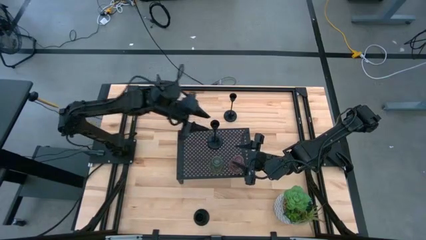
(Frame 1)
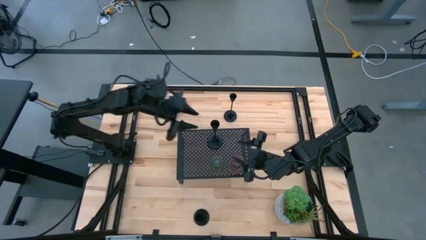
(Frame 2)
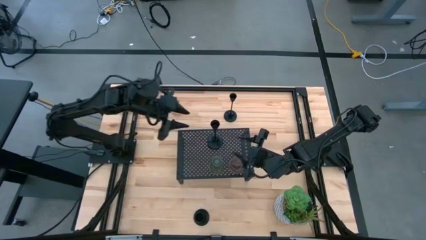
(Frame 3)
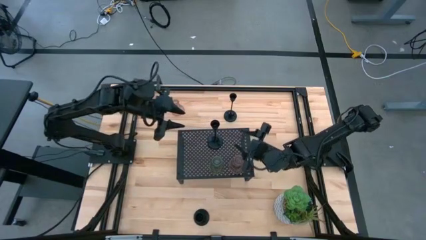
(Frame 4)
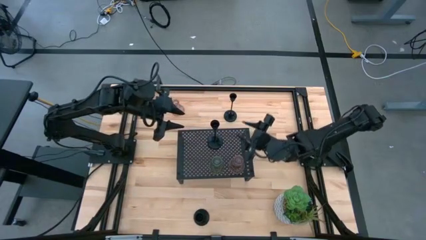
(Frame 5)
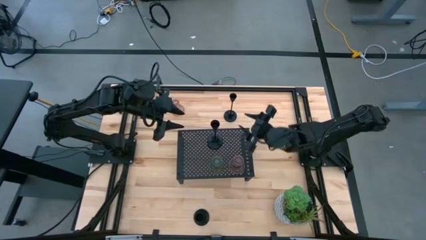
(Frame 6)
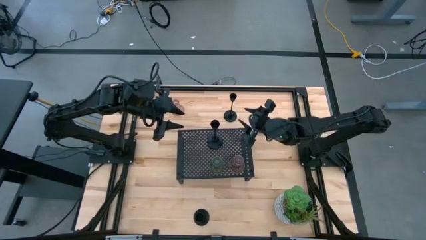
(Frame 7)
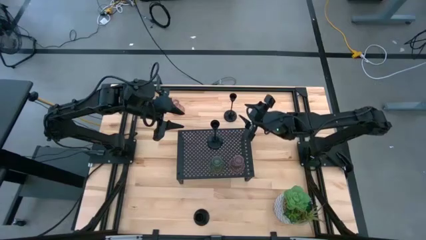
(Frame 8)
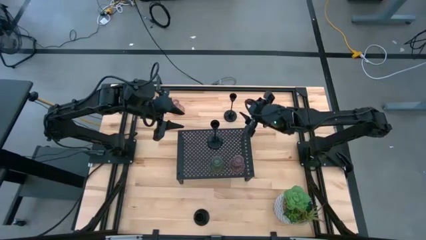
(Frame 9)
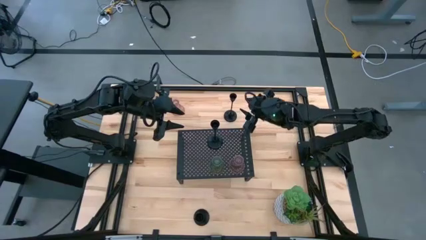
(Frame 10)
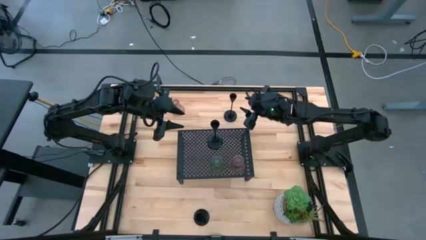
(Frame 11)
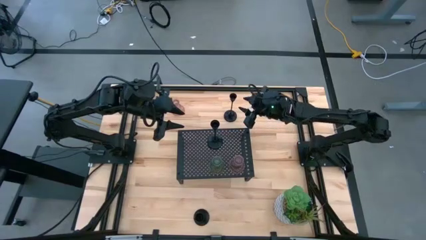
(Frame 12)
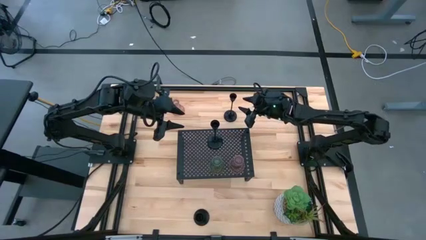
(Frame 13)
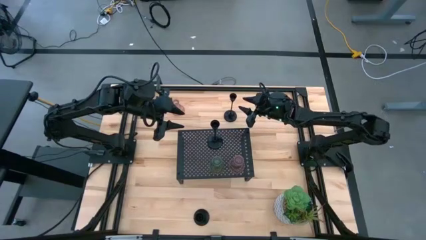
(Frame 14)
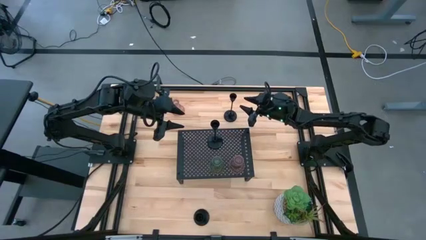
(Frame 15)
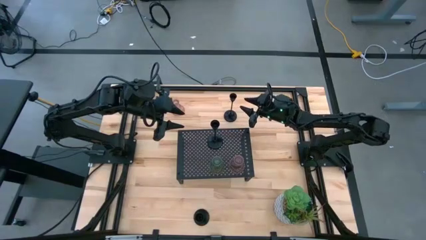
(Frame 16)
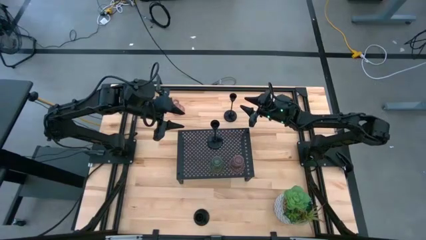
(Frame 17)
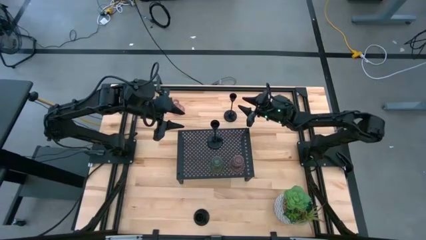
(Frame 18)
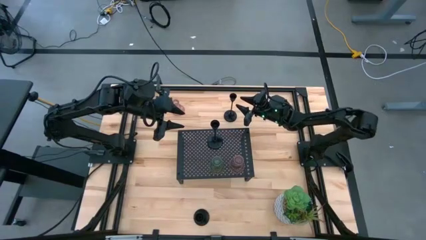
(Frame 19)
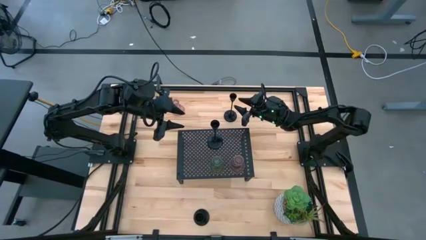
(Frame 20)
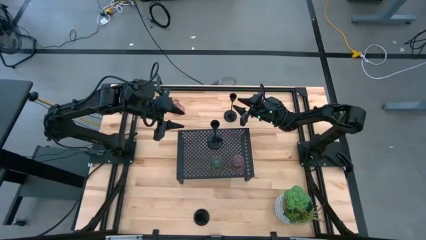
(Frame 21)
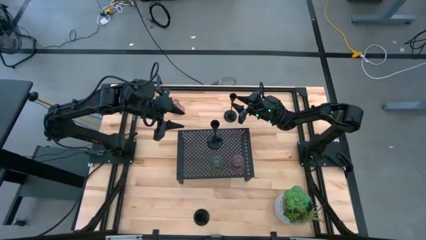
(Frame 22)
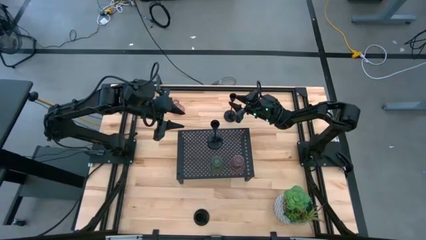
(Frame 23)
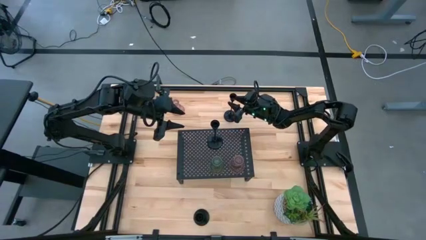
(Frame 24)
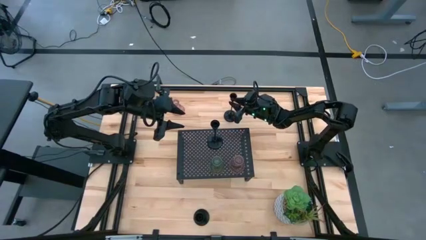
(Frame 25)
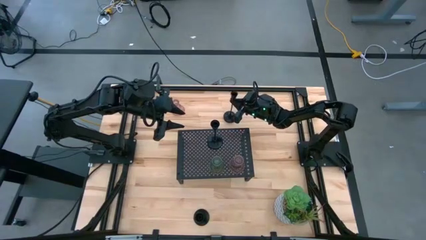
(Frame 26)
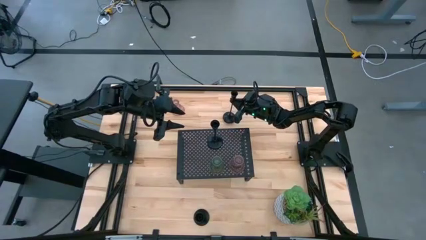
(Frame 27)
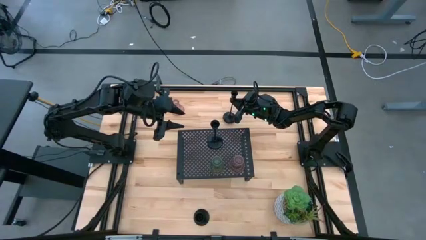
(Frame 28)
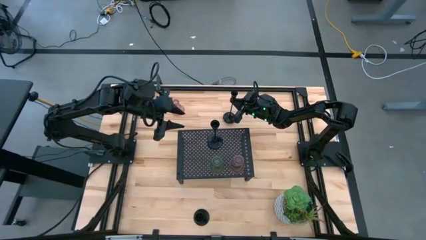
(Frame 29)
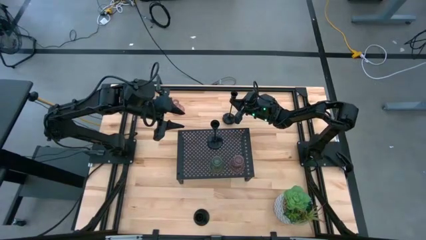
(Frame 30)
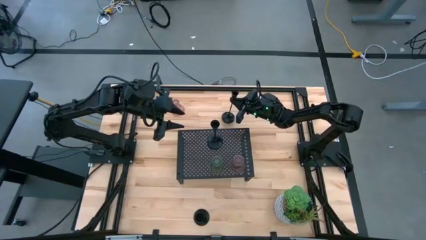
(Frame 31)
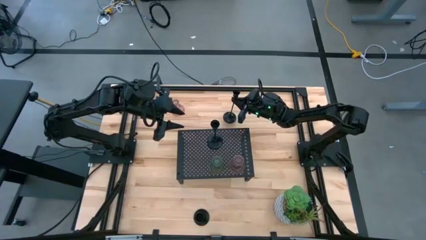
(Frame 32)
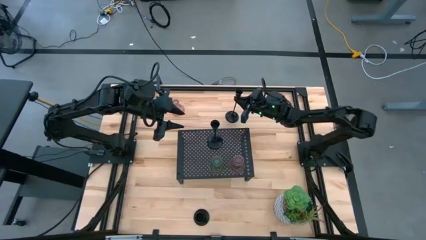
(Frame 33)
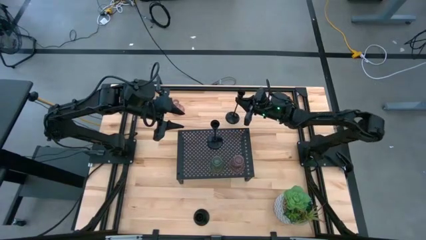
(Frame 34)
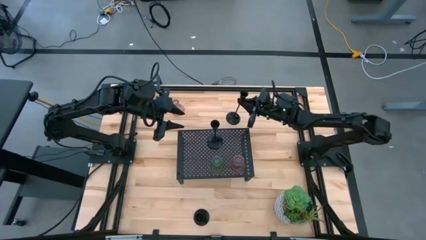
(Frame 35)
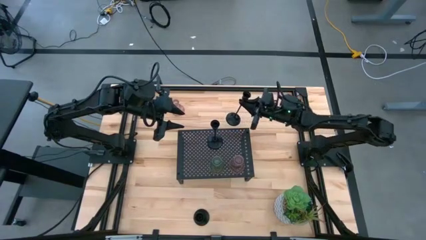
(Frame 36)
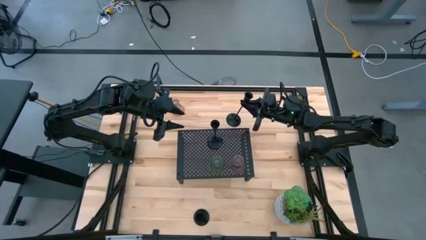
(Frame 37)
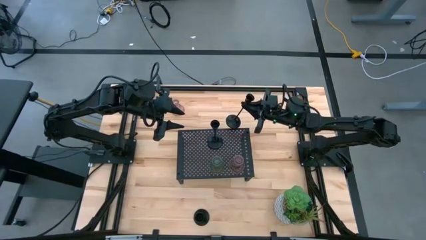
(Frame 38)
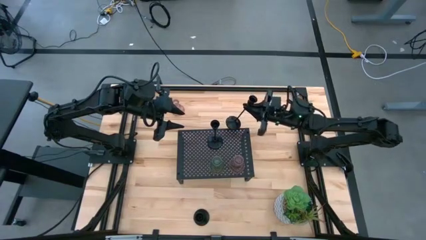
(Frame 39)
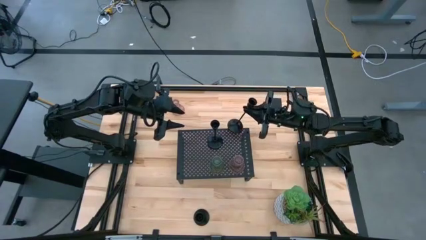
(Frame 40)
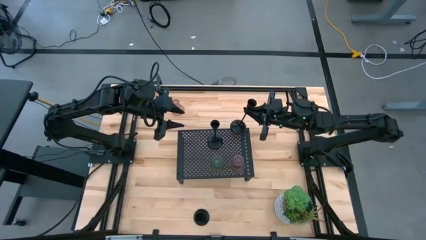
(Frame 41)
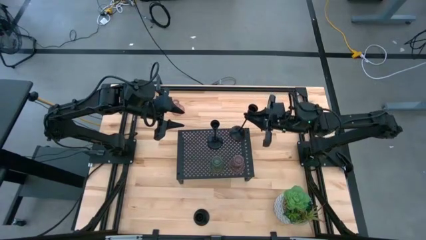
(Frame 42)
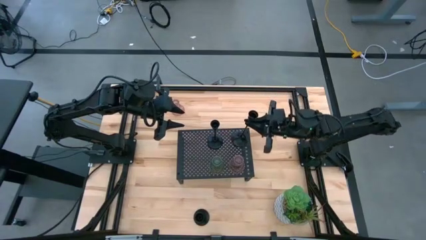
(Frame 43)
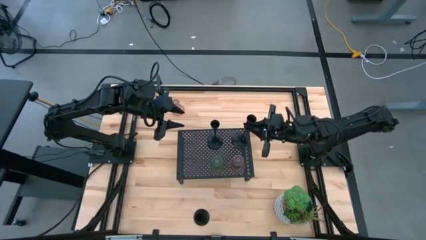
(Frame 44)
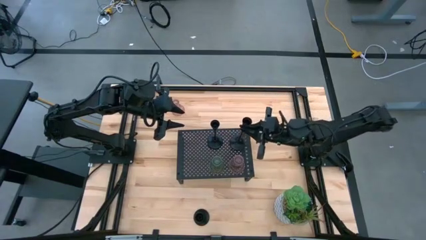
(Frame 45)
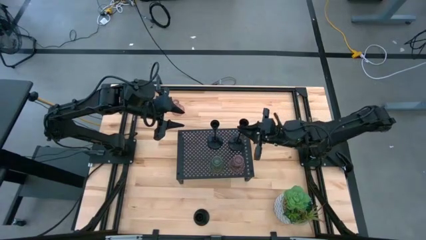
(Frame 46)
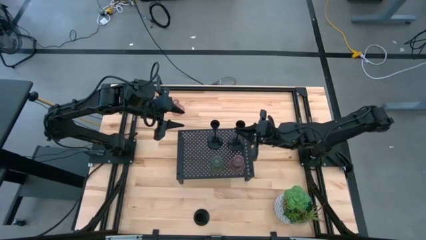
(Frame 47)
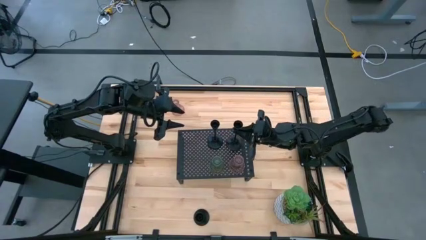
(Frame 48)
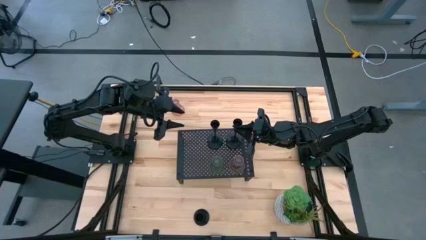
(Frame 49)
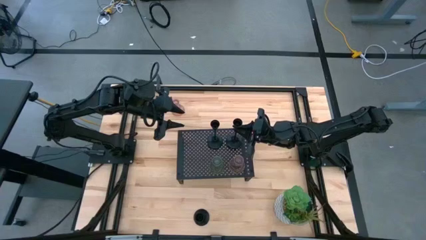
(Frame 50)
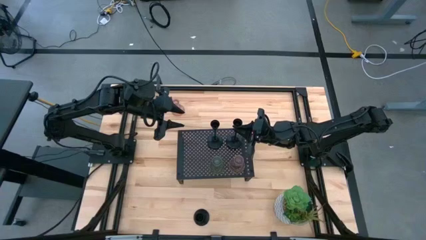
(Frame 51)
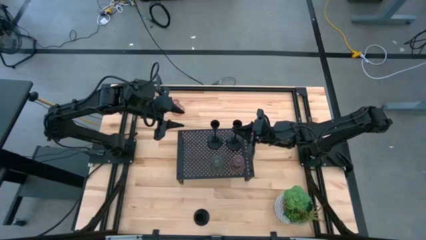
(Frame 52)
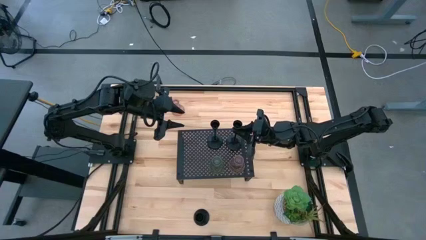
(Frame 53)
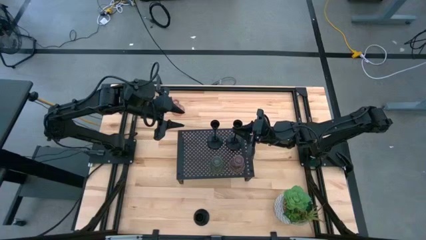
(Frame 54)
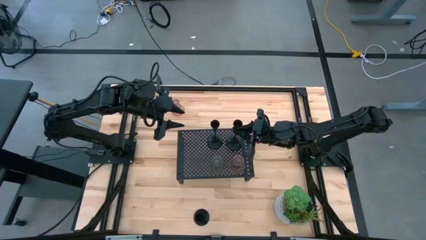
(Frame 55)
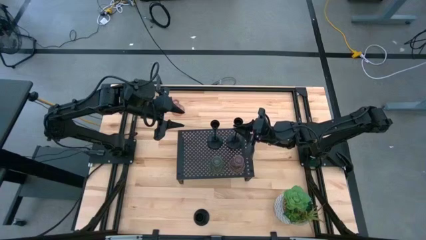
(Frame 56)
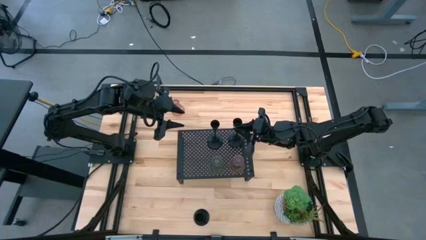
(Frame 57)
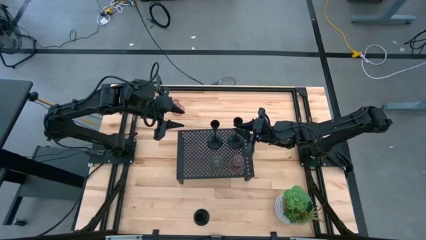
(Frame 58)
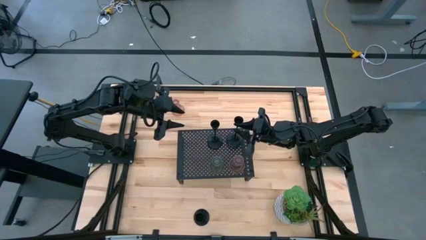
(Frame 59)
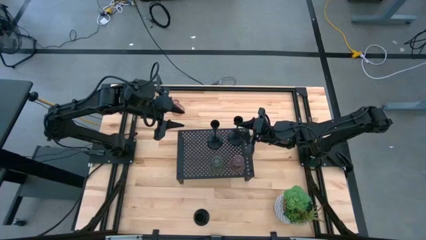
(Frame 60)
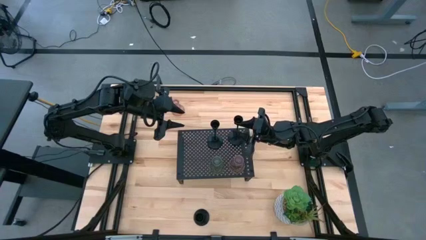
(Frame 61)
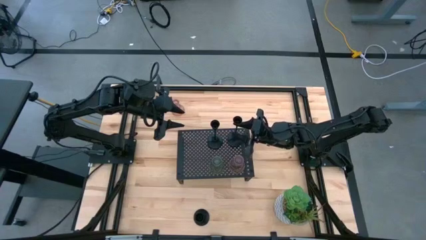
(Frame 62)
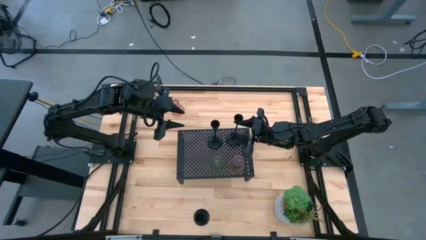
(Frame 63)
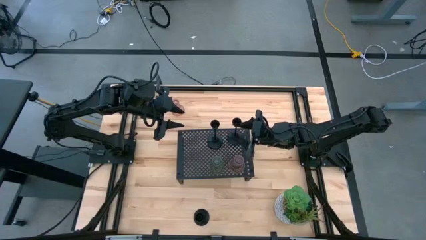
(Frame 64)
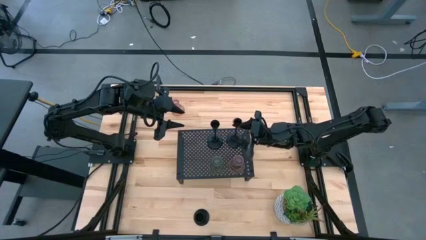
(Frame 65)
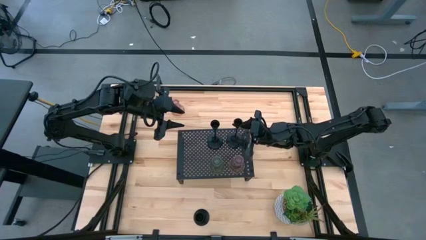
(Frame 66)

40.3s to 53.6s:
Task: Pick & Place candle stick holders
Align the top black candle holder on the shelf with the black candle holder
